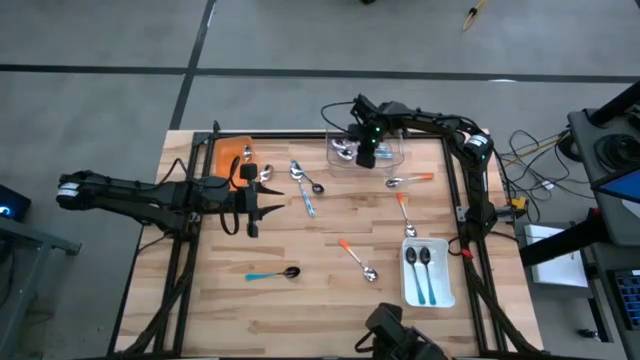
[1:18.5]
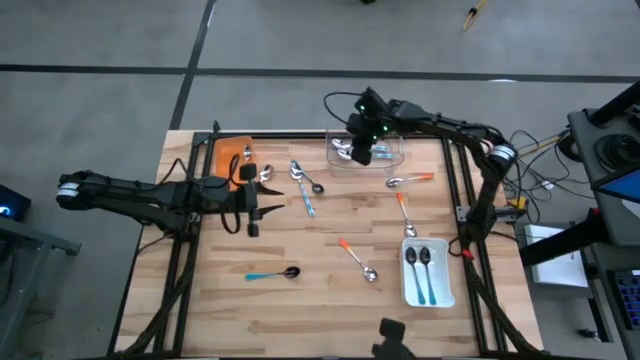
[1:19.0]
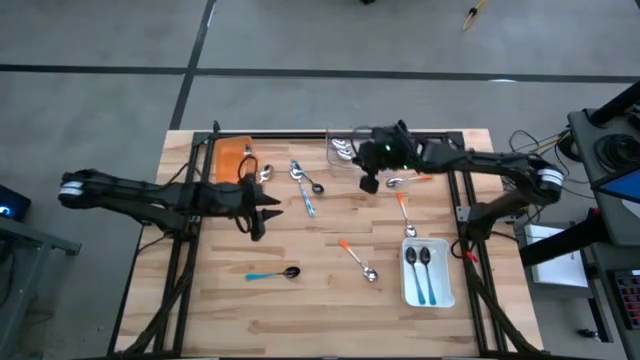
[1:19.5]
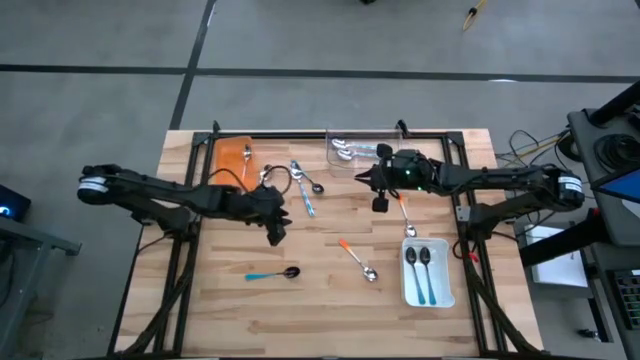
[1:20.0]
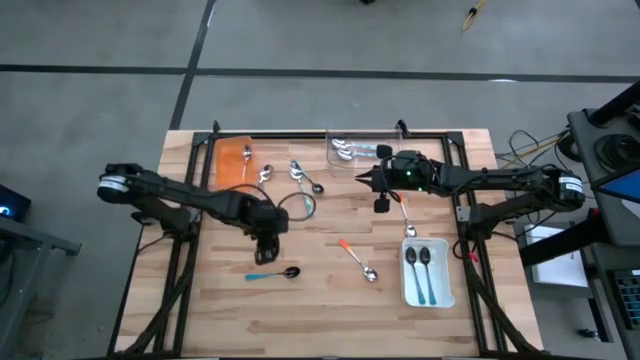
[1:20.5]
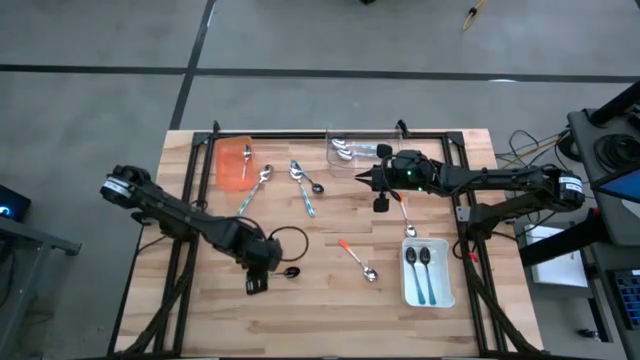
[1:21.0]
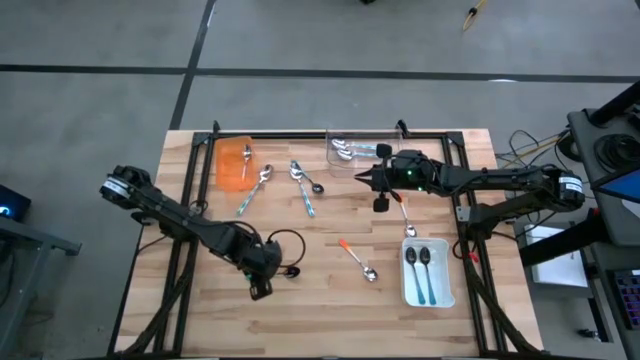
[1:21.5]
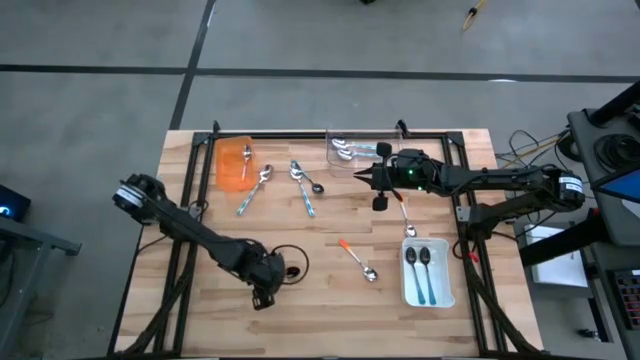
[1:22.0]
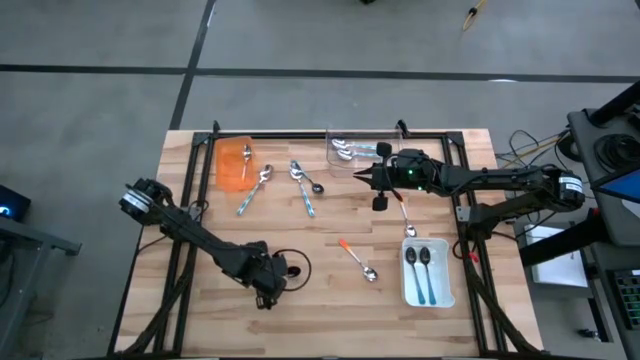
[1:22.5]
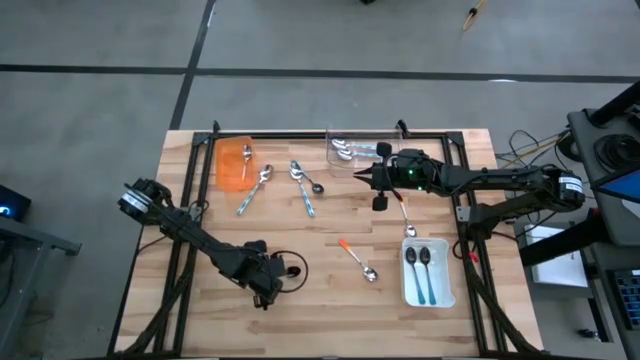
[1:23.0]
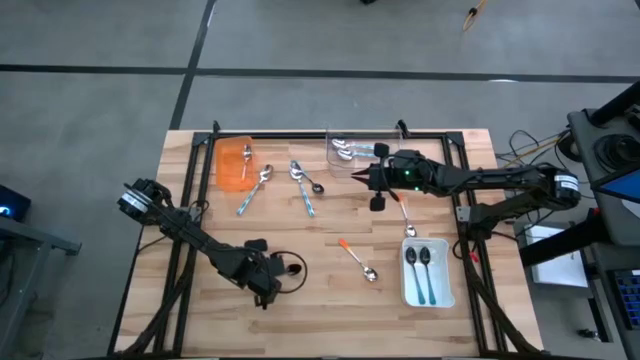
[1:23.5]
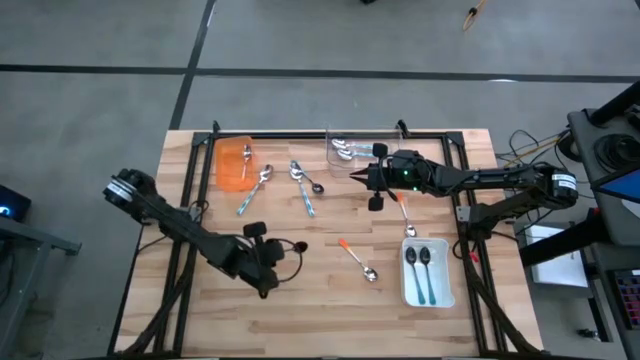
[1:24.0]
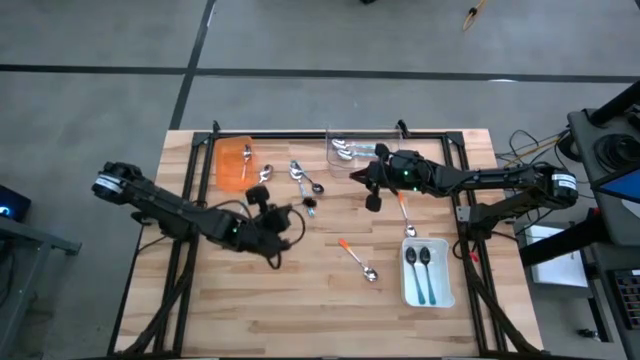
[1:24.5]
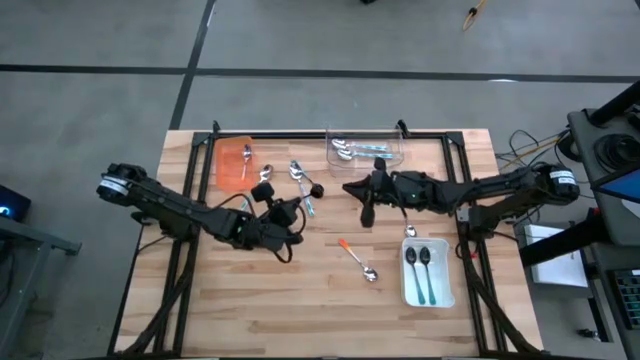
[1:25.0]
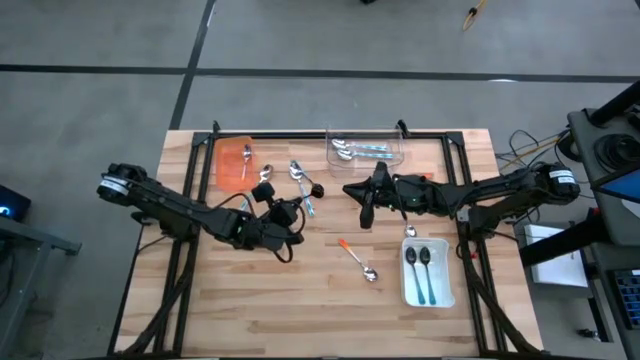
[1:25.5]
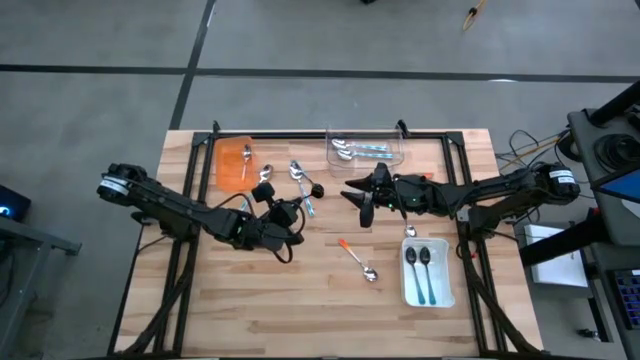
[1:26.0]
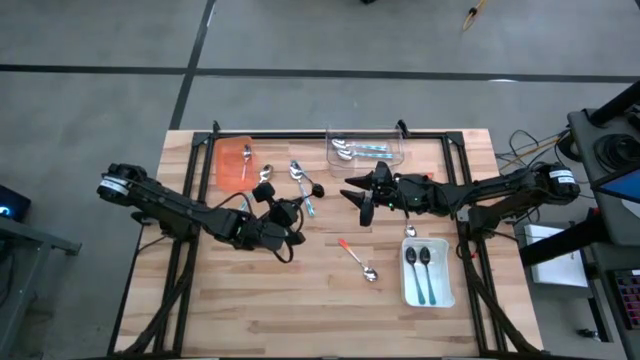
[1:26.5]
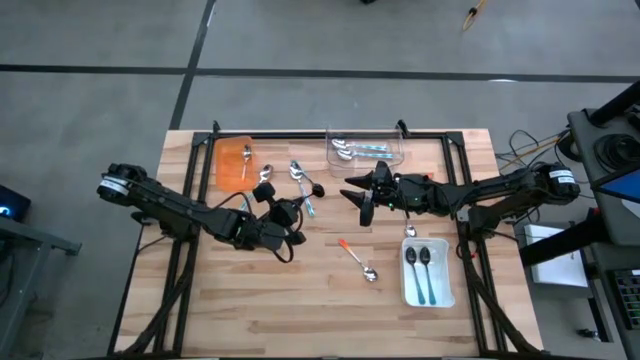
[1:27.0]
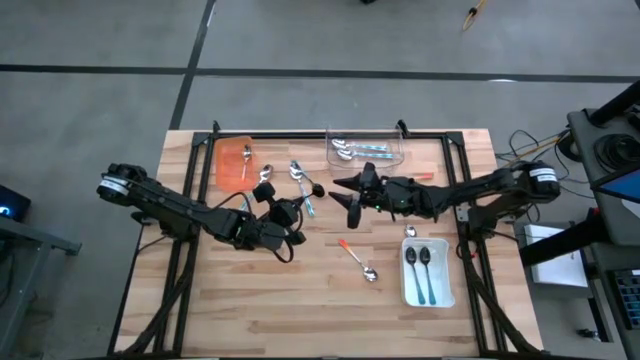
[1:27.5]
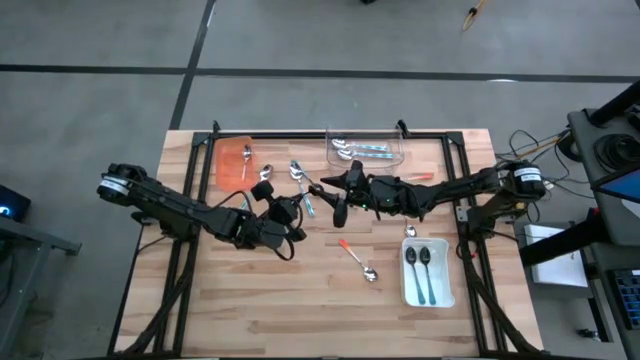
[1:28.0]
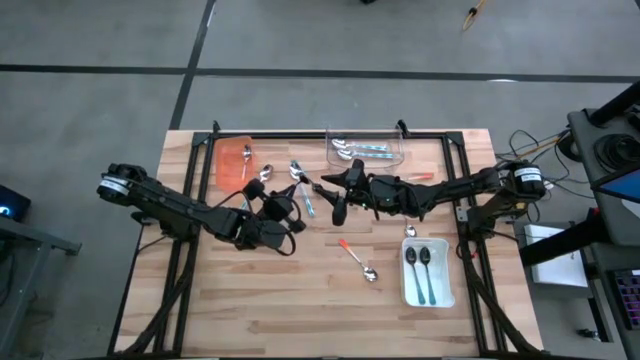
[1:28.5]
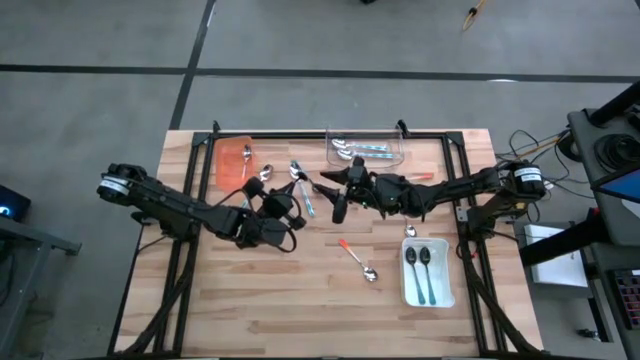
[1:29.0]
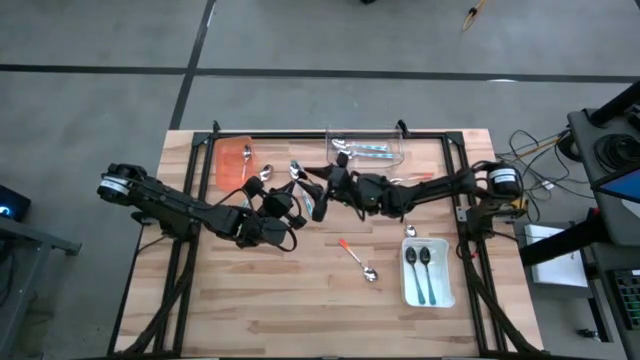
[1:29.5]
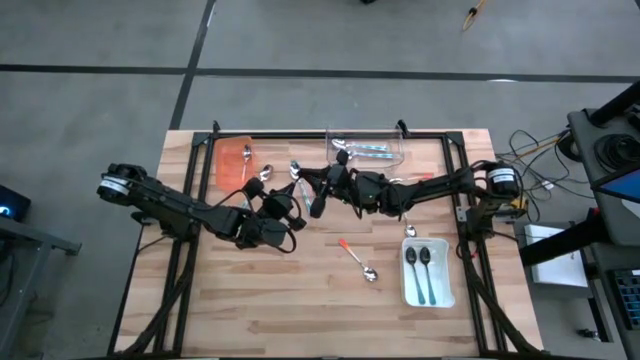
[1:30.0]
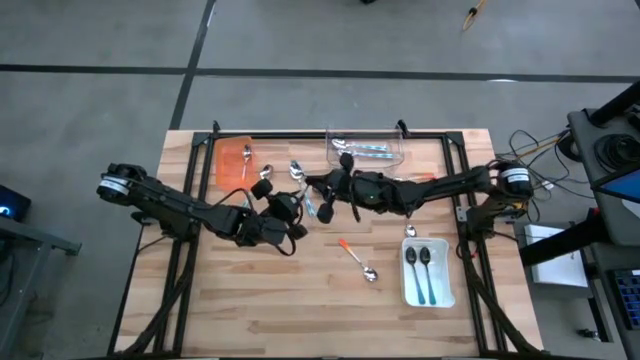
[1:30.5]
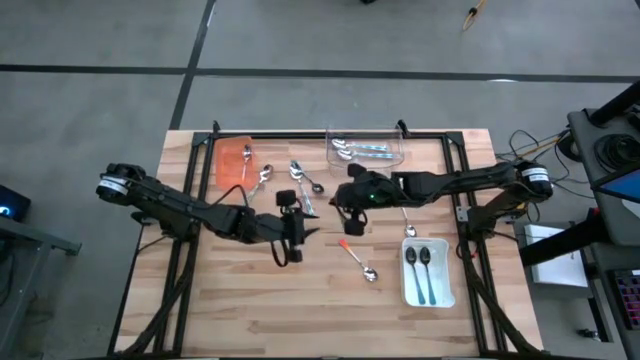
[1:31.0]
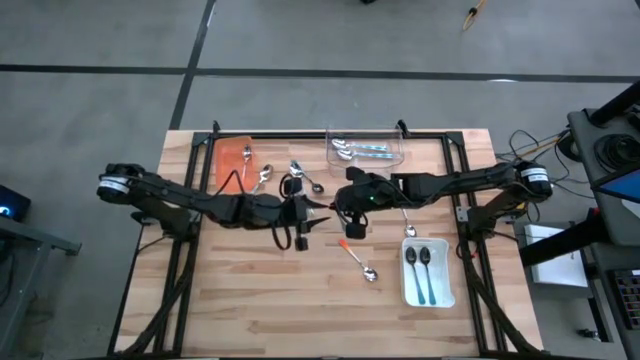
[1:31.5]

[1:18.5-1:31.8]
Task: Sort silverware by color (type)
Put the blue spoon into the white bin

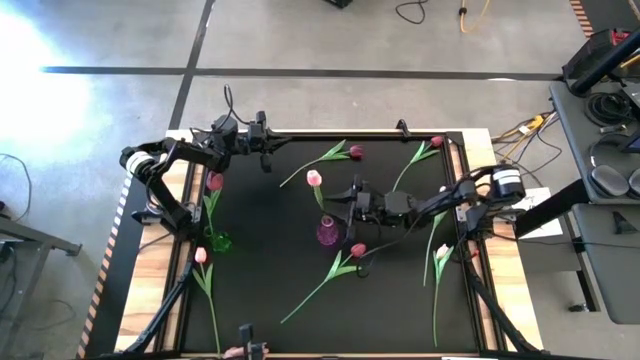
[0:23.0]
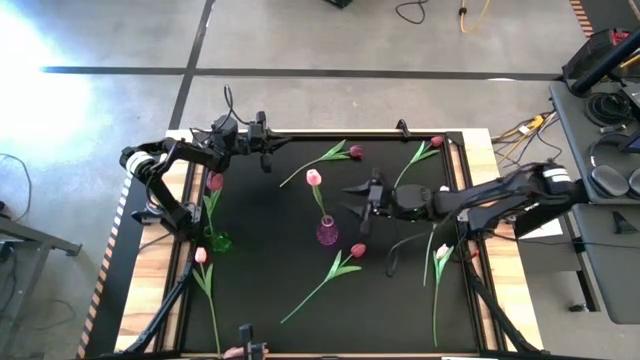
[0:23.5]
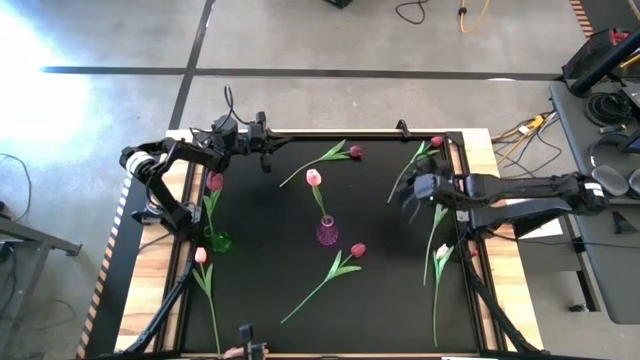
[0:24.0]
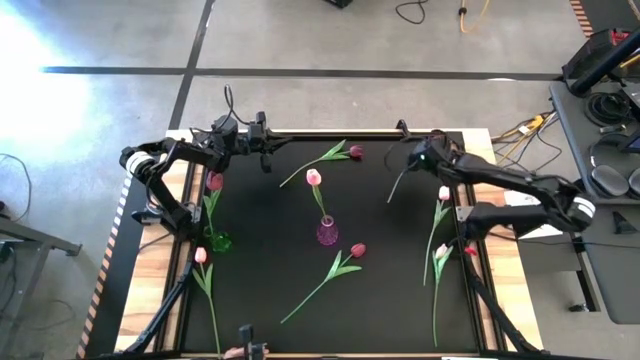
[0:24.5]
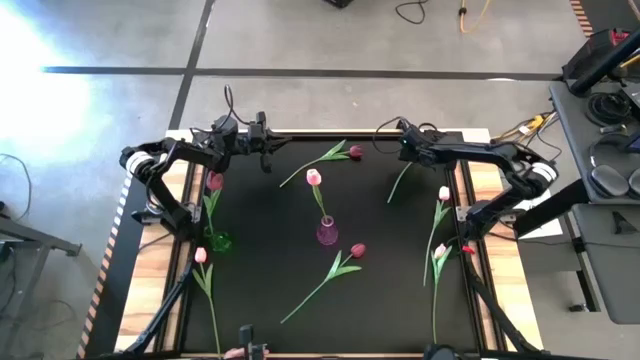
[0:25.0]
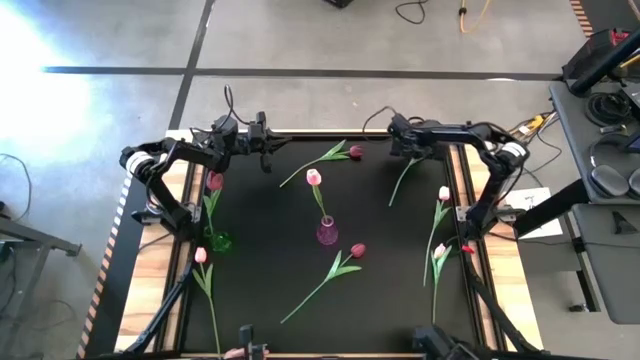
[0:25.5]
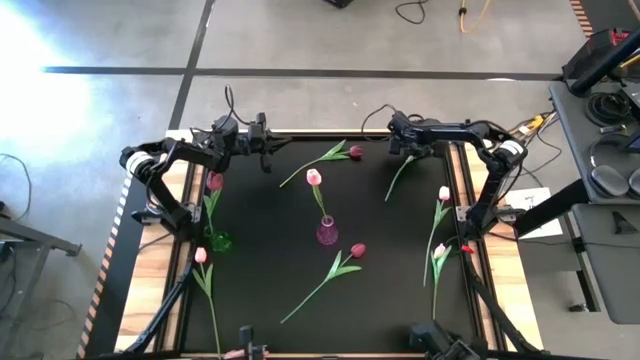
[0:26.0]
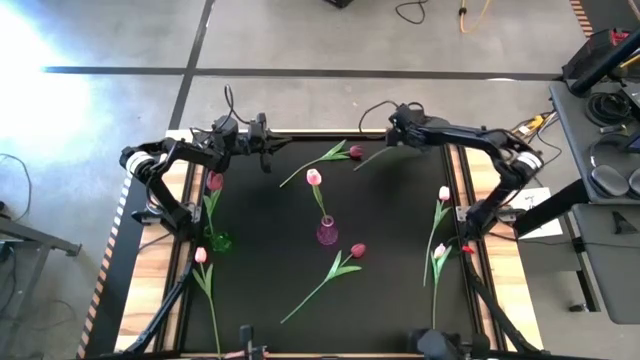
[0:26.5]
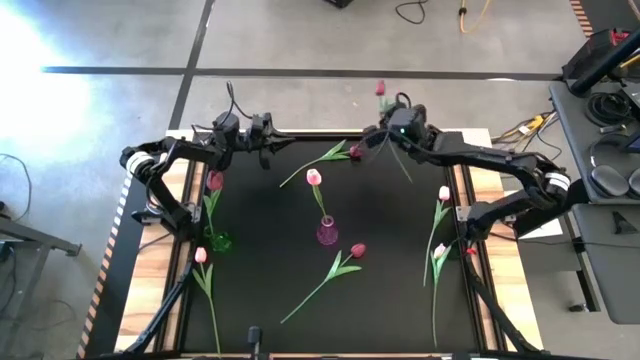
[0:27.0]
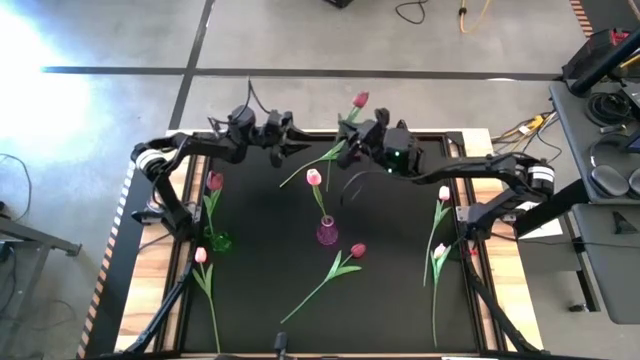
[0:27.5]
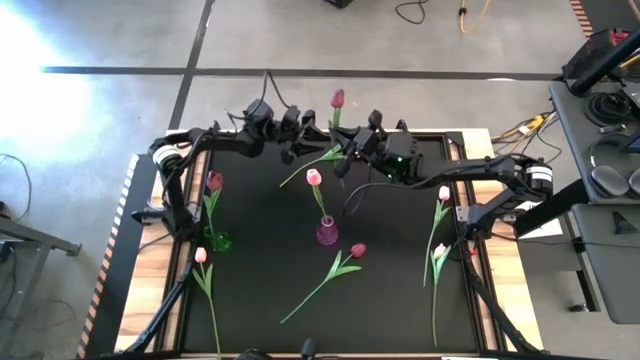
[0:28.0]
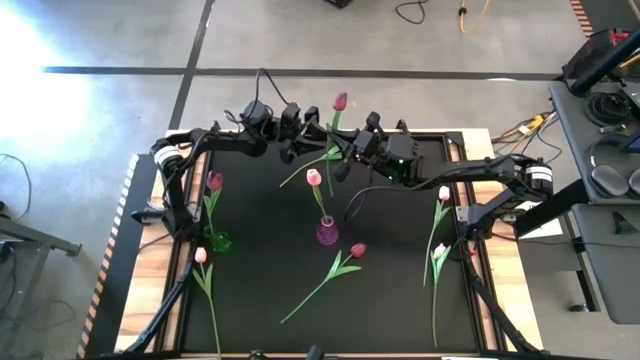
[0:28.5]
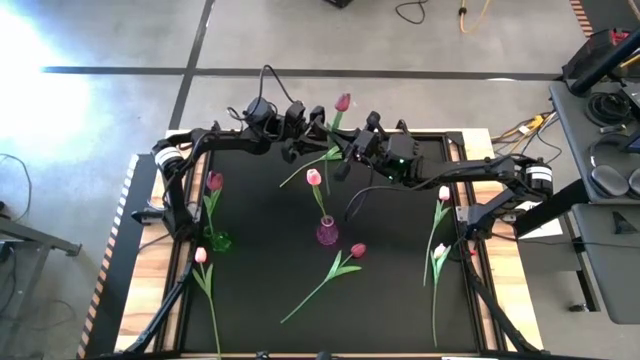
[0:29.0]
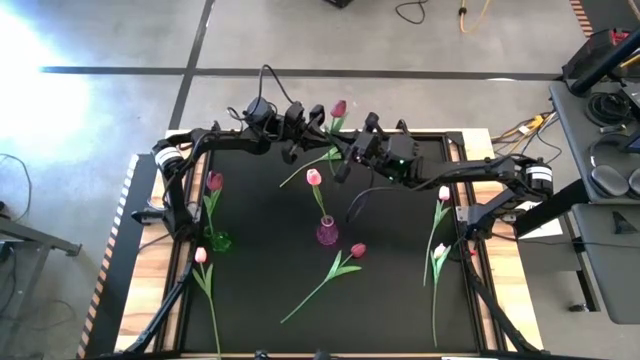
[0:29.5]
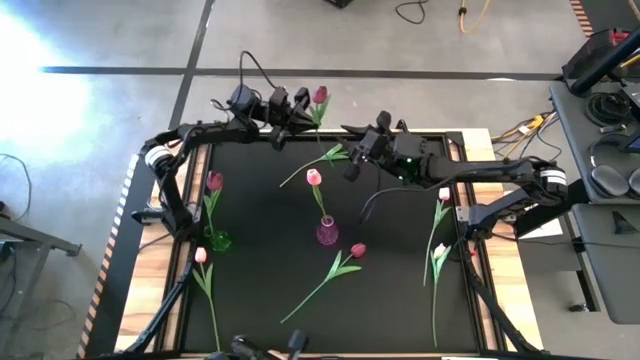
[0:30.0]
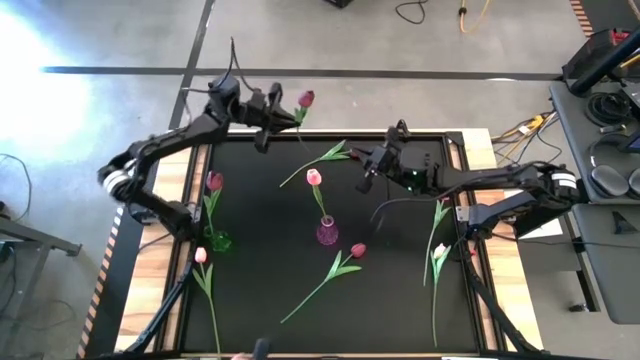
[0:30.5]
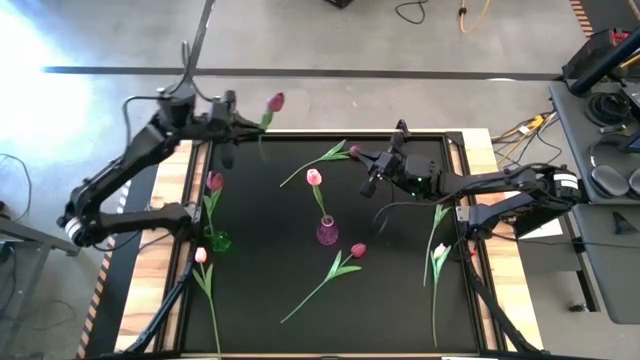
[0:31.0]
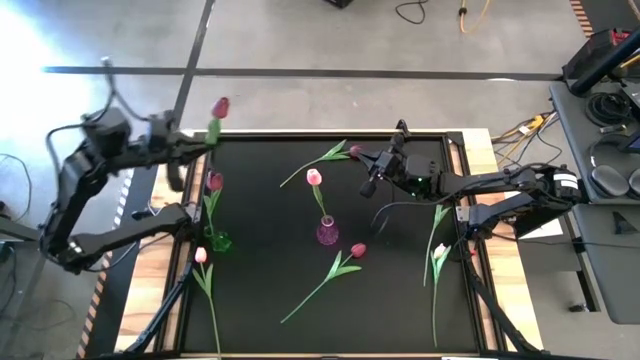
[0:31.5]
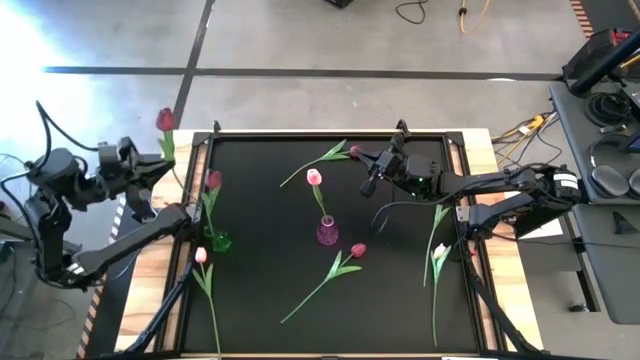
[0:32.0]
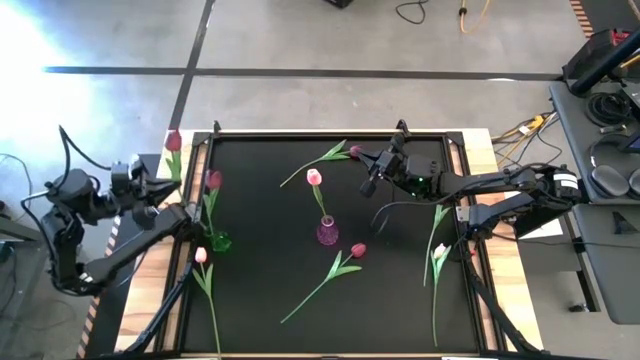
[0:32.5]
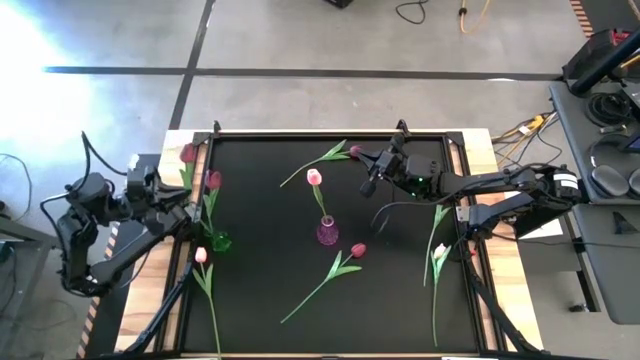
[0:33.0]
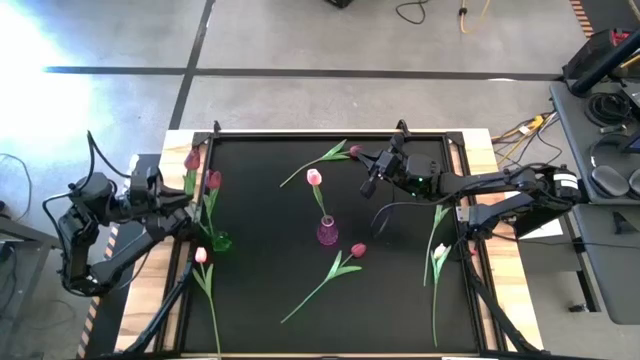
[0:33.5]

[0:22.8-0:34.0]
Task: Sort flowers into vase by color
Put the red tulip into the green vase
